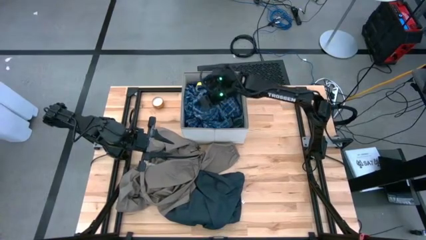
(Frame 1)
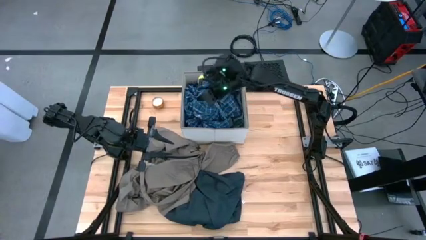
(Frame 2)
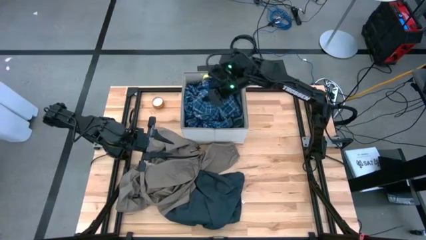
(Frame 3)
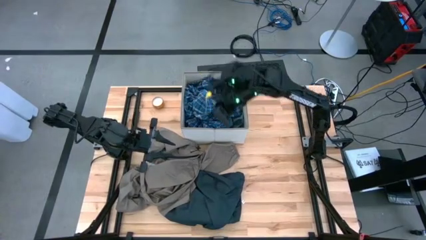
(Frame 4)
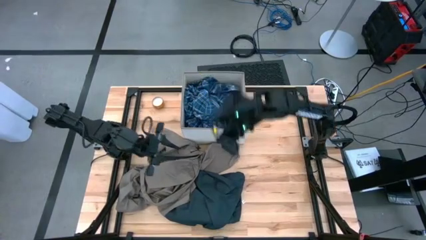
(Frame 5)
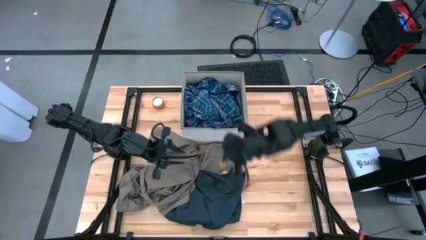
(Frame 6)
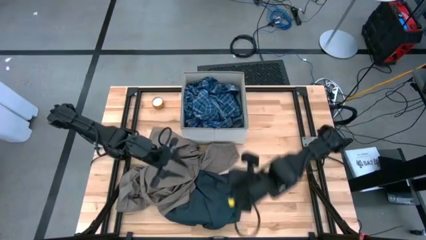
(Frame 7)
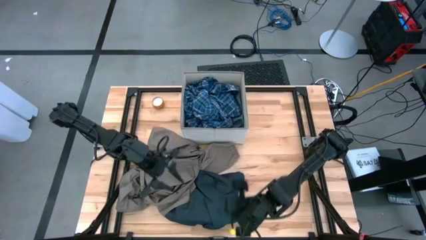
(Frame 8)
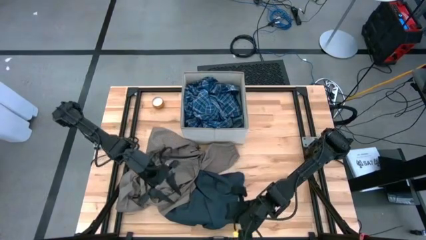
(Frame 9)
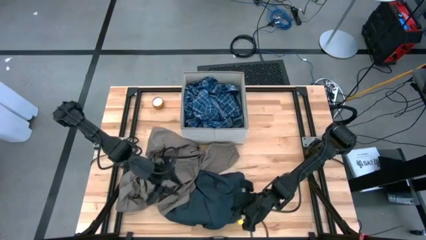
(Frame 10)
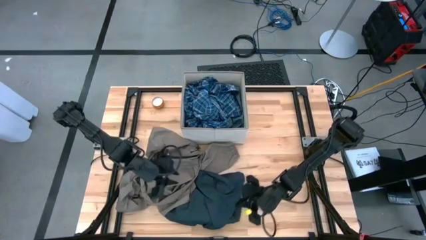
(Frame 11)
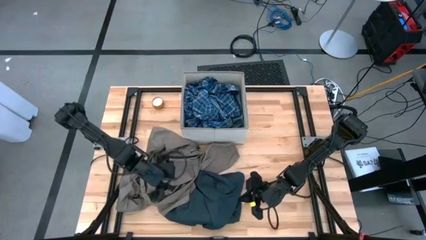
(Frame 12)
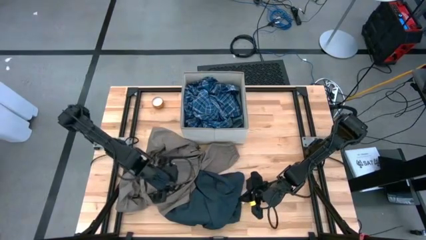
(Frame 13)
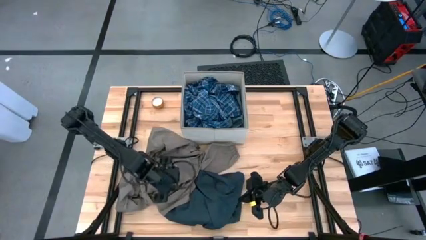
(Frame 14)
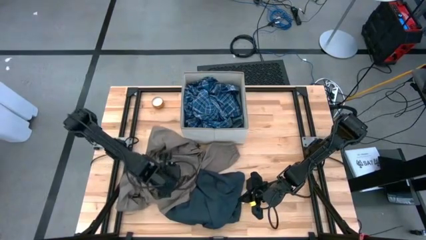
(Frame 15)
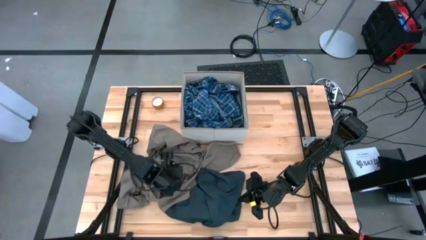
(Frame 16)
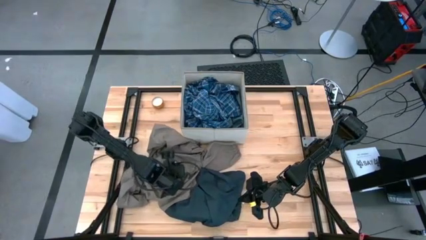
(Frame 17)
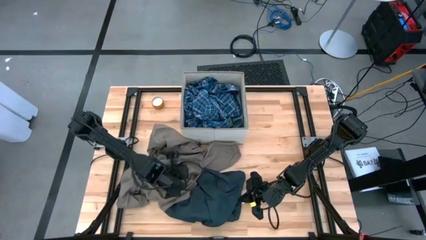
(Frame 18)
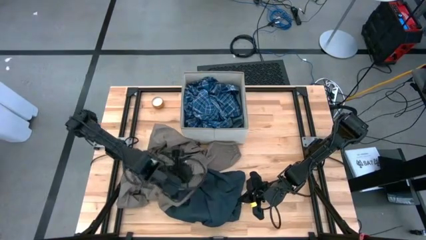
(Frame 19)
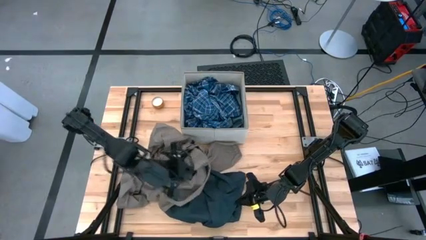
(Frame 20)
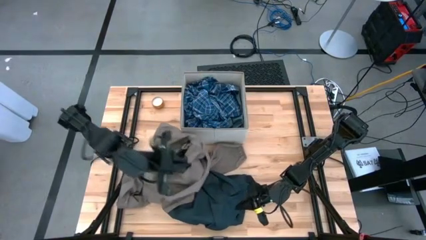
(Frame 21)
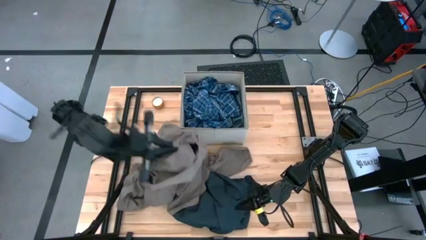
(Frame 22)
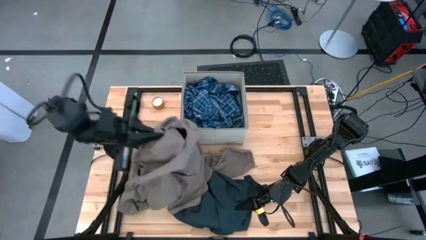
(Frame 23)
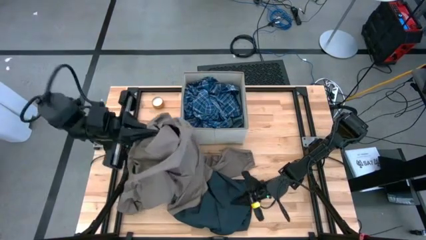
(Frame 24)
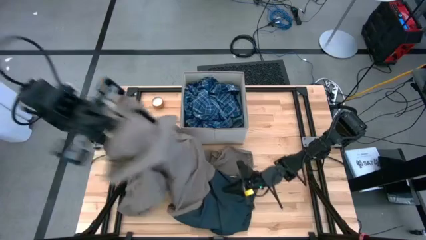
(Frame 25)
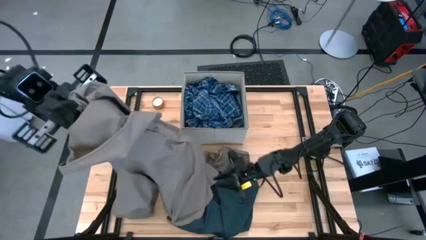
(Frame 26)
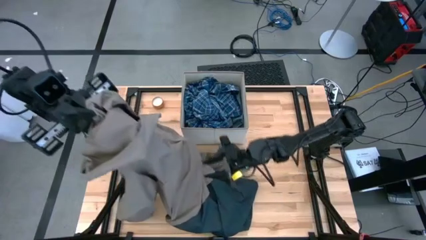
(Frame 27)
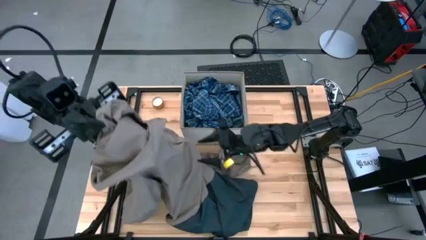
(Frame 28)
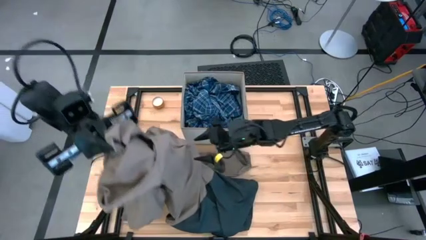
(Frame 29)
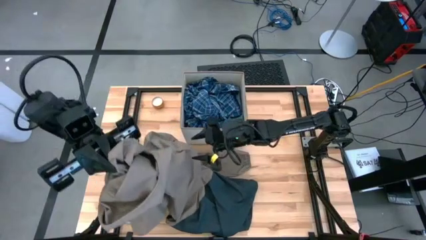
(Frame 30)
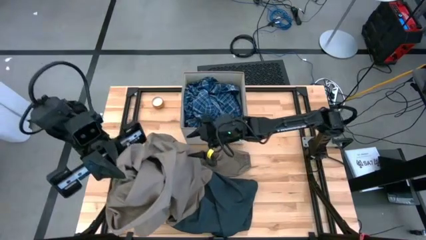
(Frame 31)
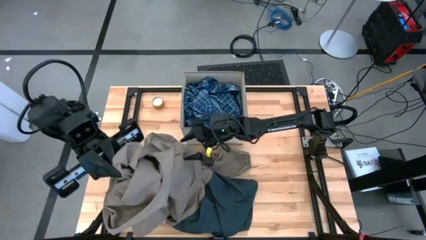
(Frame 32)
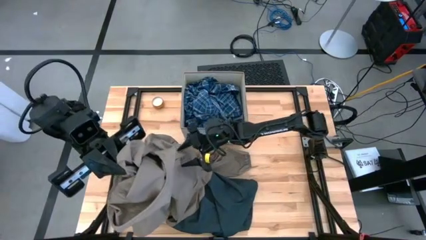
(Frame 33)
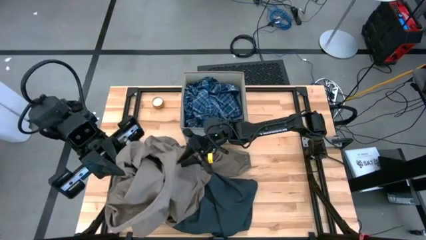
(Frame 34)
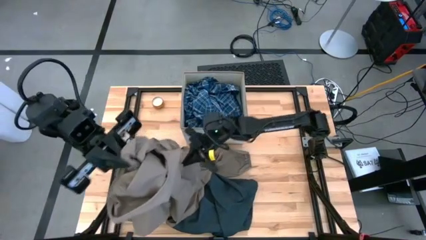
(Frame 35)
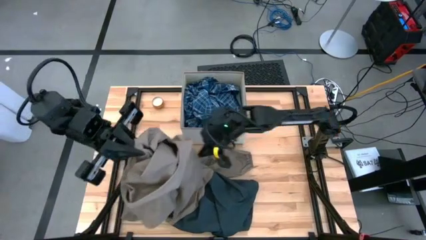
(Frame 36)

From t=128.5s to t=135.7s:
Task: Sort clothes
Put the brown jacket into the laundry bin
